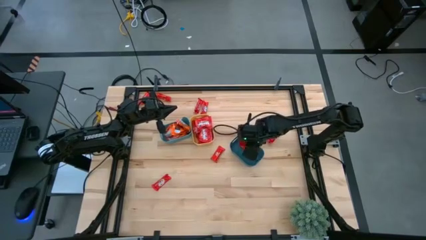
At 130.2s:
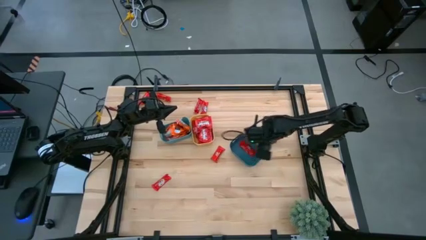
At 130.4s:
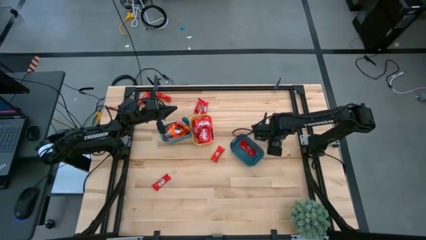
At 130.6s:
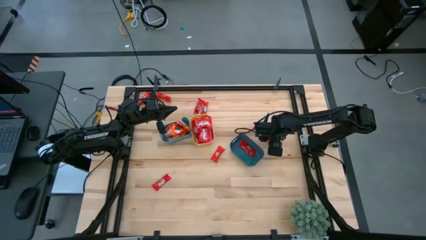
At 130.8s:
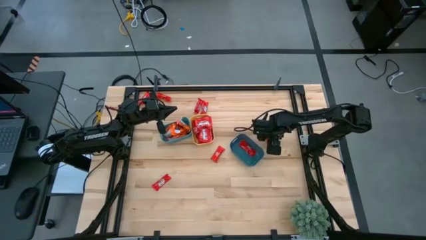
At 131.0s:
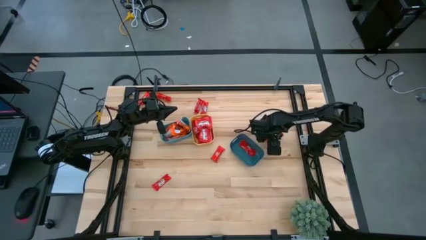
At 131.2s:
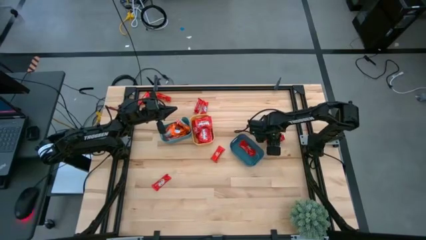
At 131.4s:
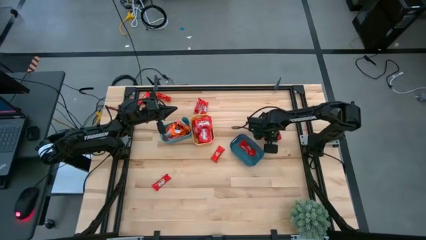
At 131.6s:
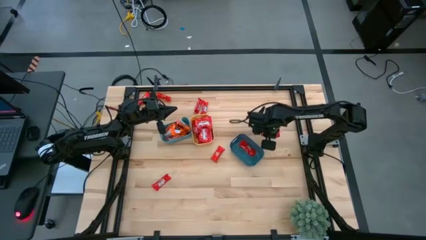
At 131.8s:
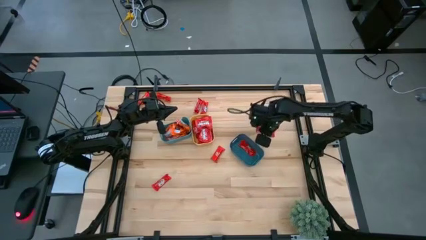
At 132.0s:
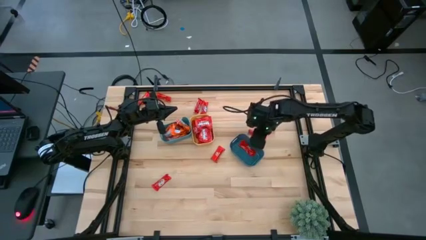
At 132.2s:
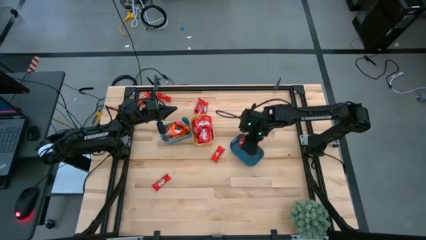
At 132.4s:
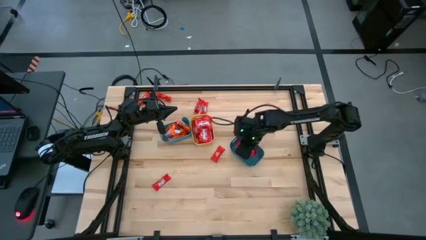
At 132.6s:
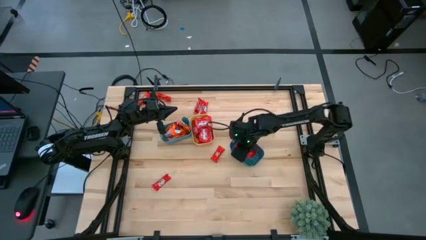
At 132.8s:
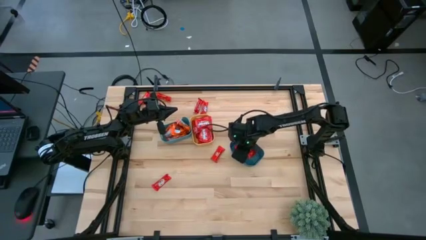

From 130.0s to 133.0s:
Task: Sort candy
Put the dark red candy into the blue bin

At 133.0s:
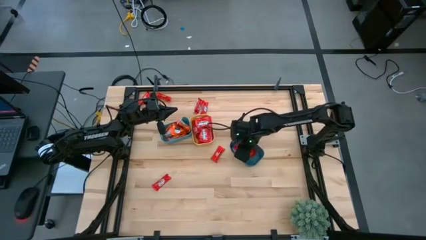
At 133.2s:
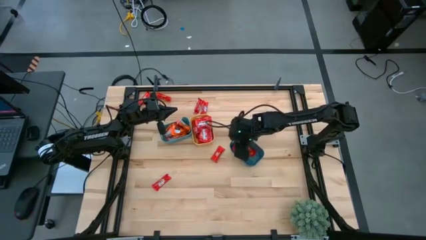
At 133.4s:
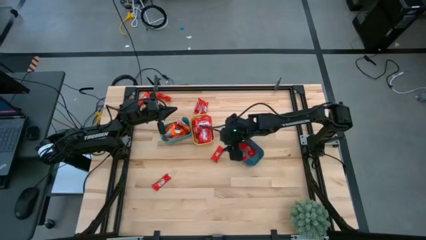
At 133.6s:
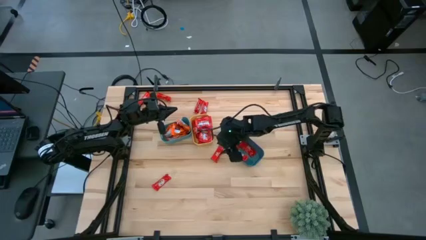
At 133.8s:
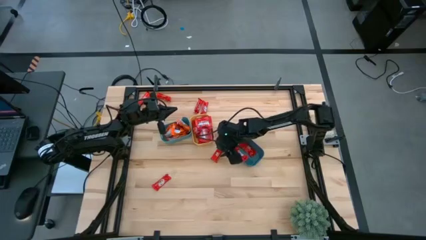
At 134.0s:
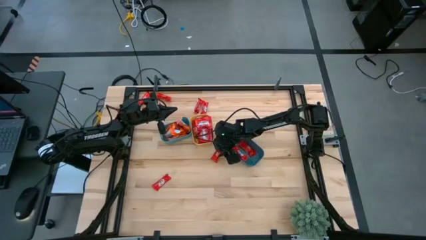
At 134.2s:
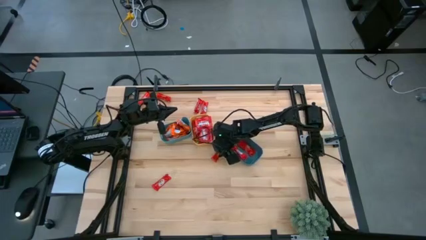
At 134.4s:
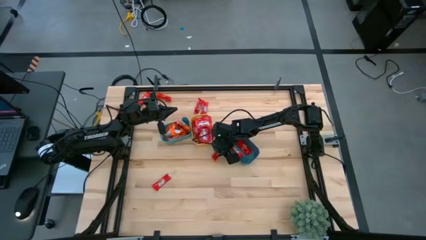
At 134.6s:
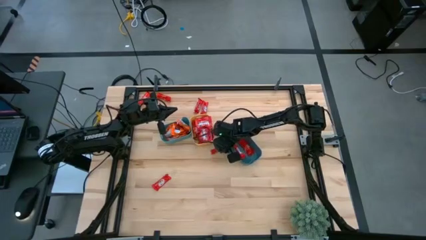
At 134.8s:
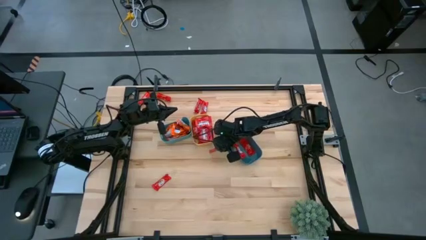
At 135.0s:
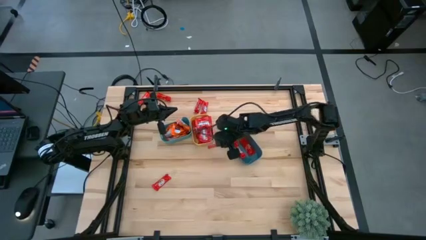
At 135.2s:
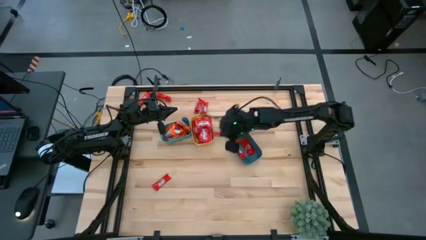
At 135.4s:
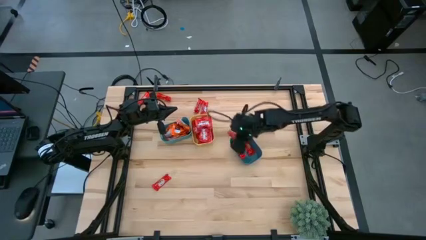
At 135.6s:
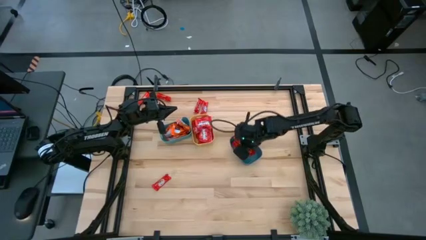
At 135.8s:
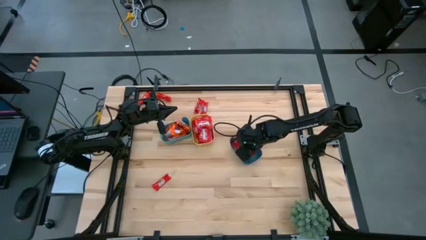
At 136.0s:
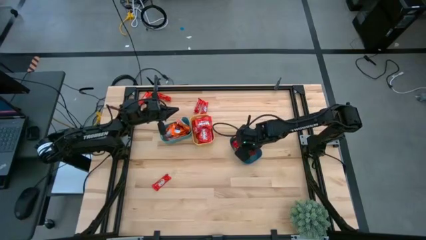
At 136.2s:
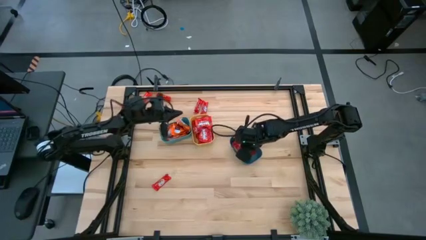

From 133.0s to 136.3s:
Put the dark red candy into the blue bin

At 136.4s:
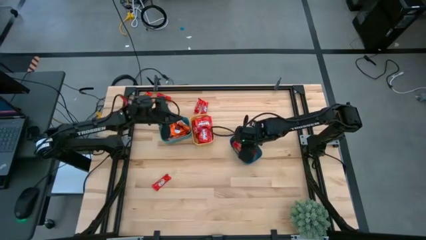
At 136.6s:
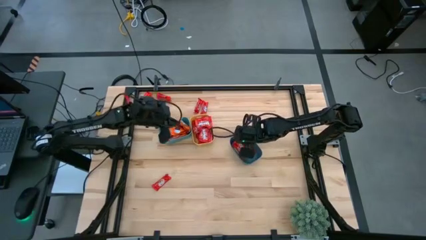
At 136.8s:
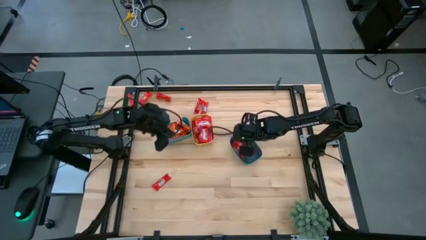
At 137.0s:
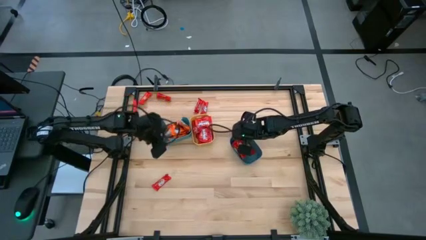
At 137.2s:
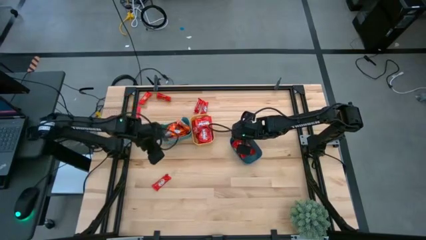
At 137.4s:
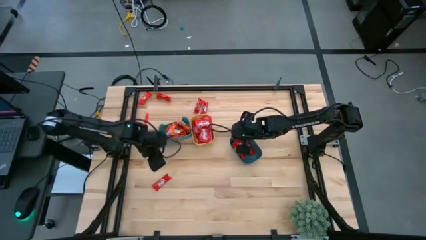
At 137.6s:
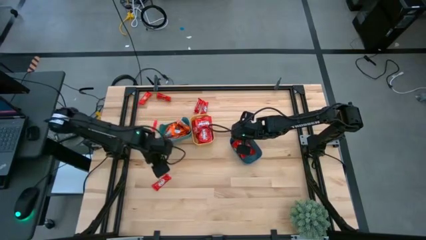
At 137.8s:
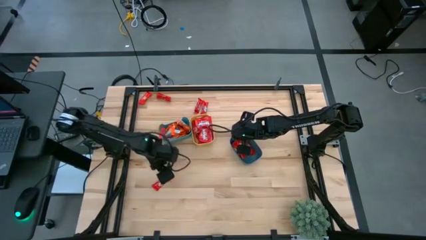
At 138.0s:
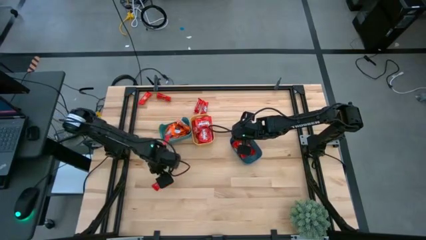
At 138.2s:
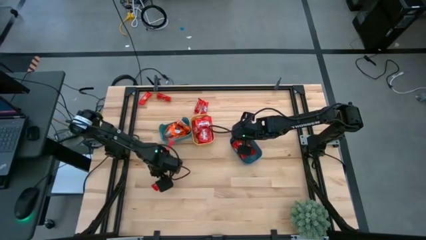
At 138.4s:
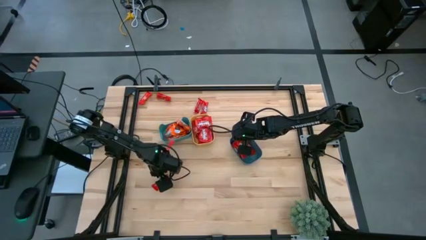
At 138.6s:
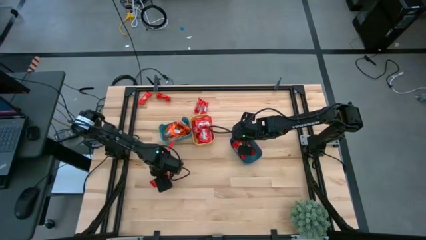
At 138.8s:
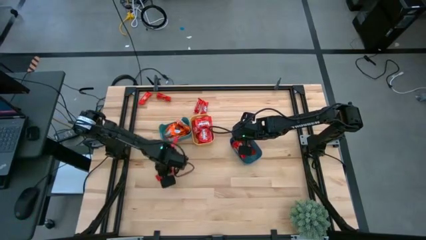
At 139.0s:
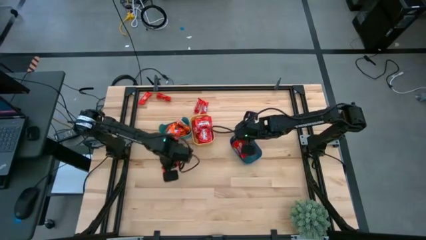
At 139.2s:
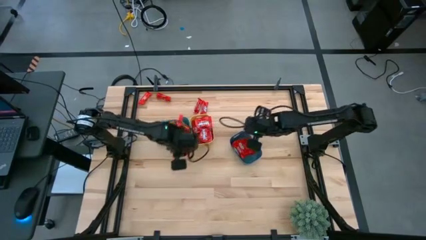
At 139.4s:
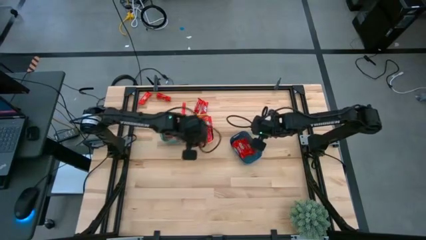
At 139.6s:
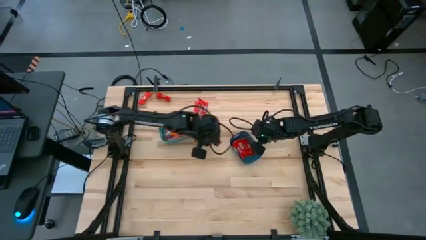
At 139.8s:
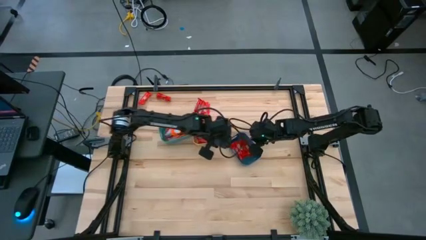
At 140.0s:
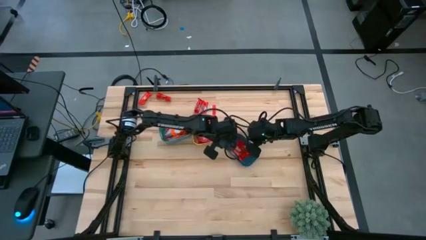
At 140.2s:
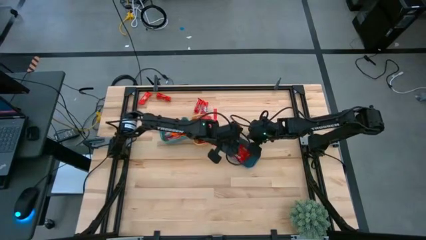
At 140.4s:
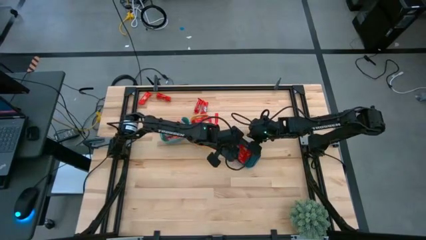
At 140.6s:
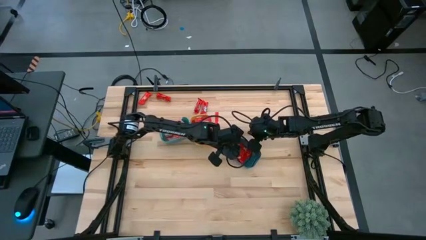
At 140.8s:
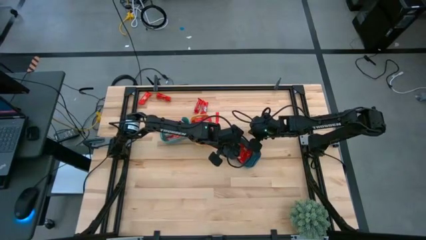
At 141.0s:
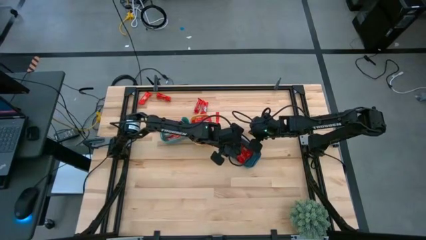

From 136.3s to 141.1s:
Put the dark red candy into the blue bin

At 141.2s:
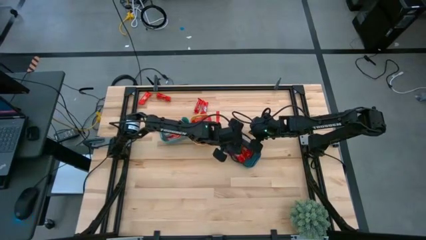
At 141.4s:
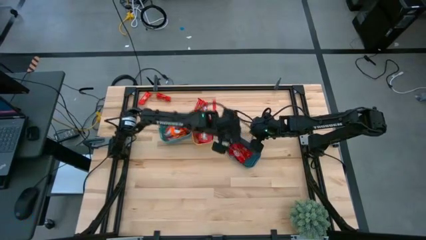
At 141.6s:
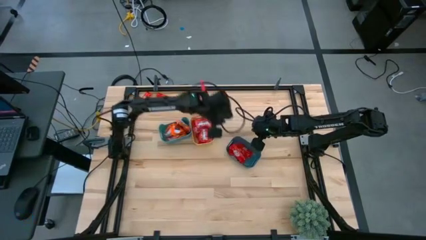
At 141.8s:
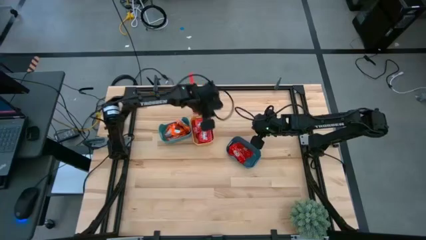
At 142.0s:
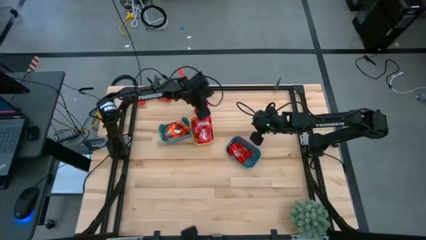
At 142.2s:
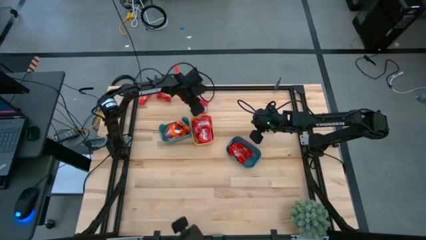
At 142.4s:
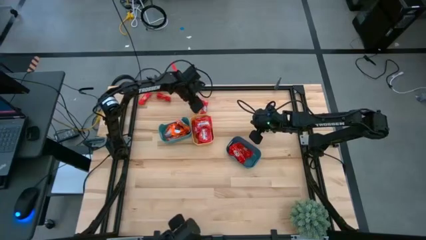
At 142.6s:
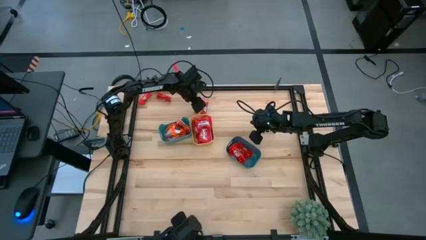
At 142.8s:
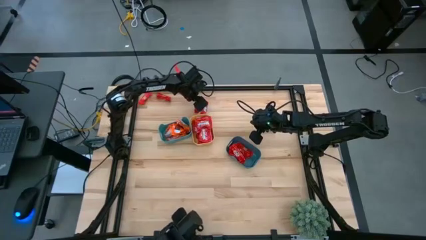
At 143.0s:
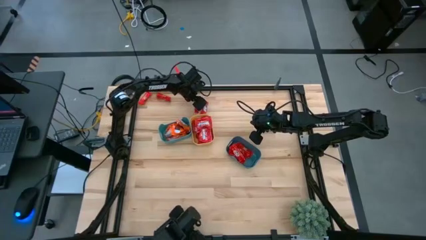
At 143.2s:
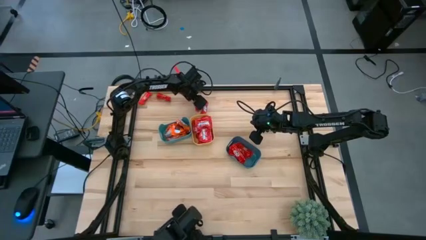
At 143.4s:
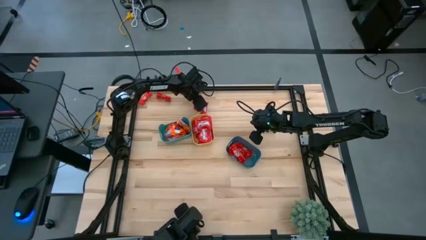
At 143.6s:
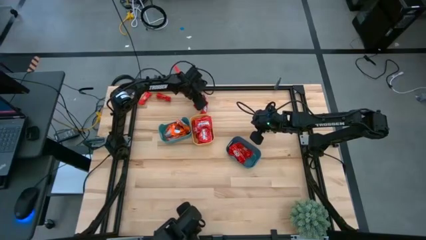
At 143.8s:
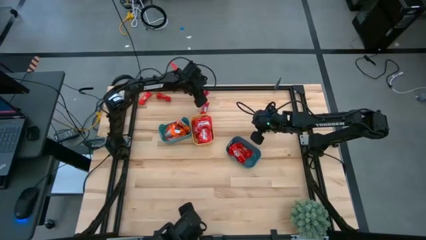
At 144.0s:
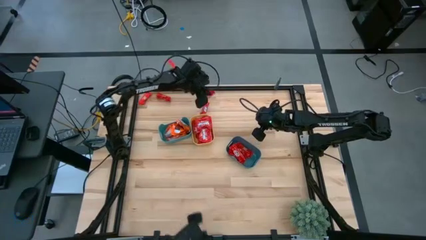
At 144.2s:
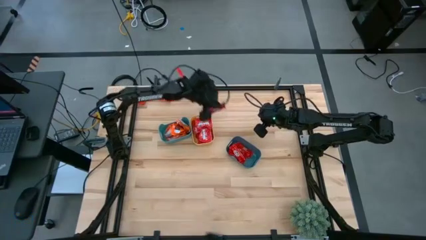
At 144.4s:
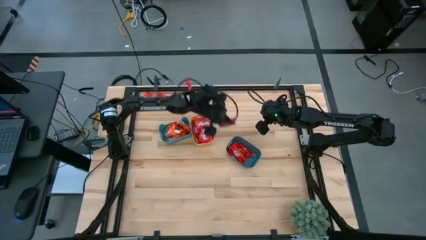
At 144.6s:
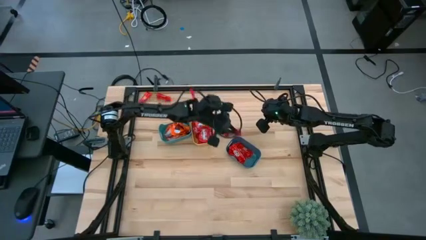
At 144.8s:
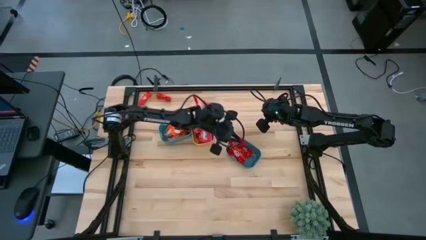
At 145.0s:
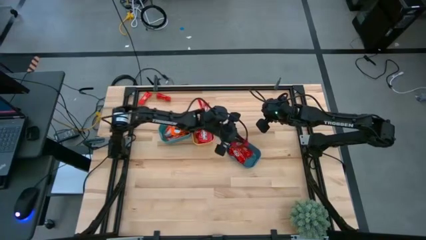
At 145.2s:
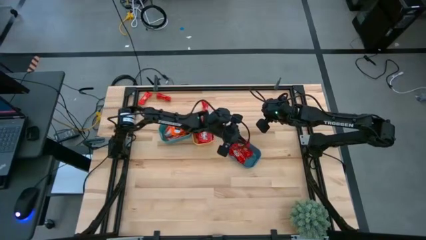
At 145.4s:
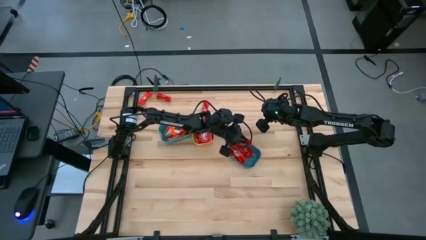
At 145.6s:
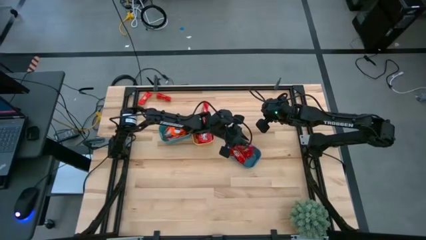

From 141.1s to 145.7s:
Put the dark red candy into the blue bin
